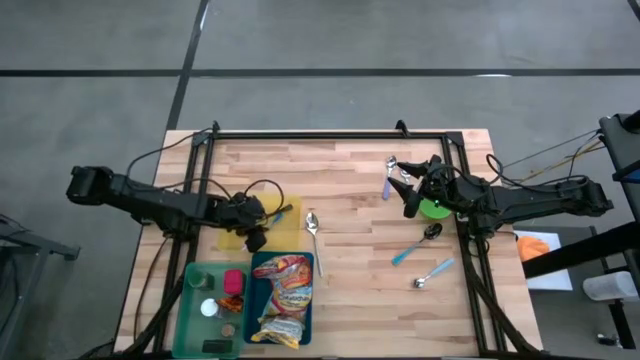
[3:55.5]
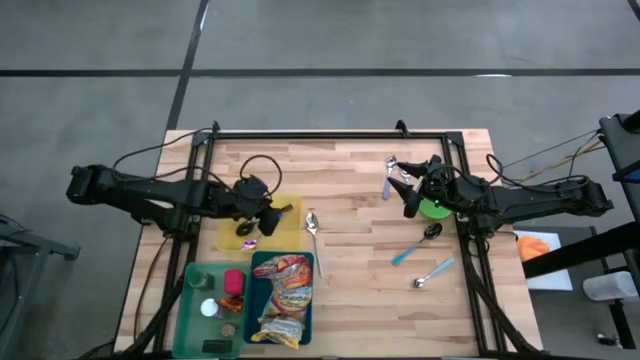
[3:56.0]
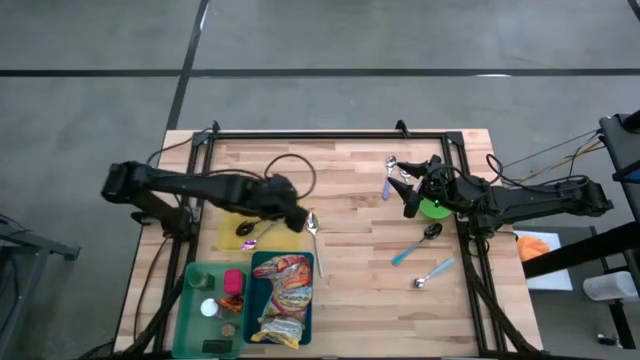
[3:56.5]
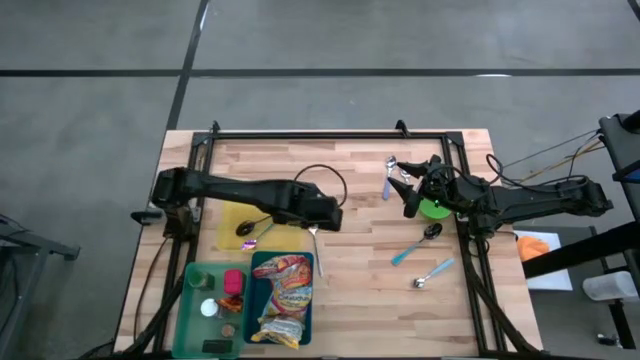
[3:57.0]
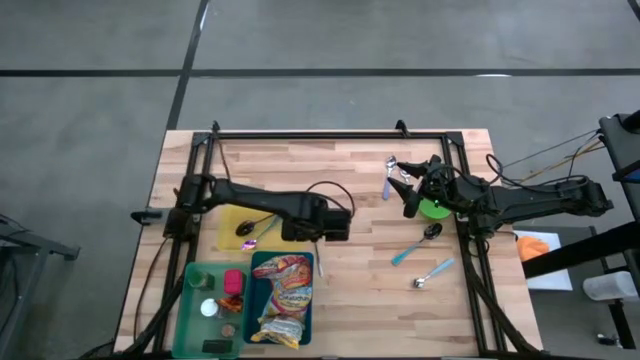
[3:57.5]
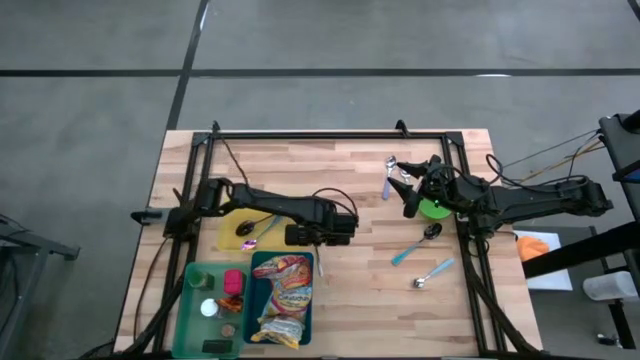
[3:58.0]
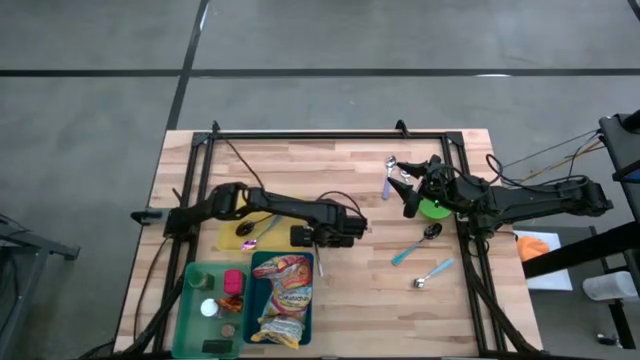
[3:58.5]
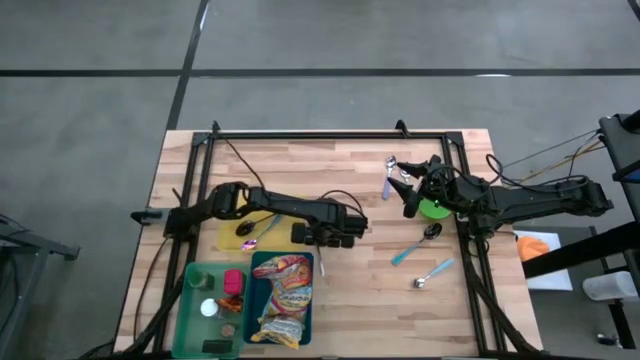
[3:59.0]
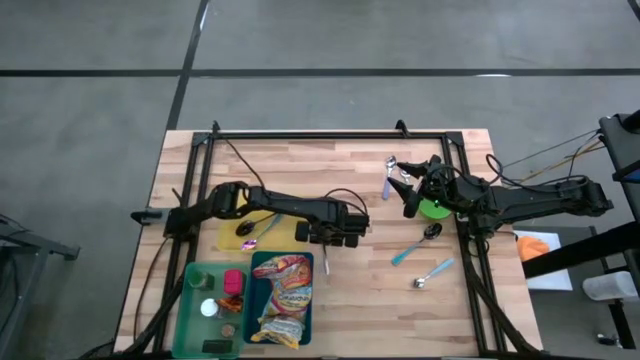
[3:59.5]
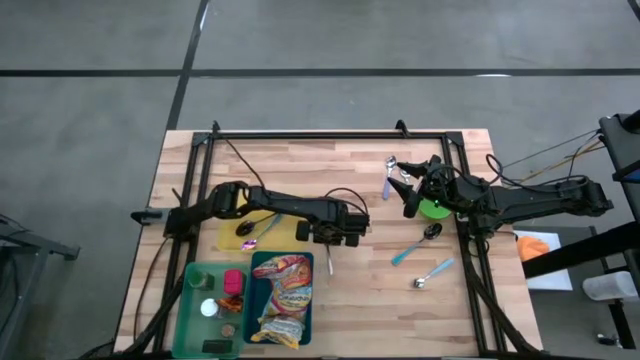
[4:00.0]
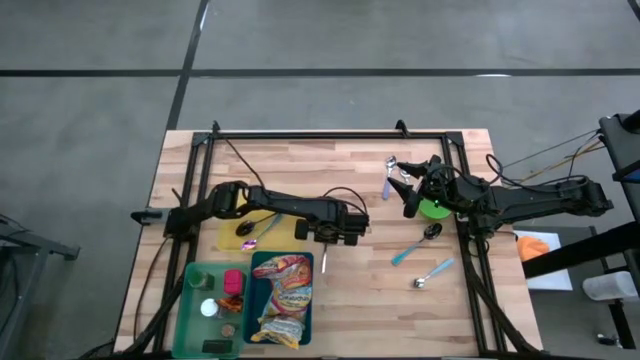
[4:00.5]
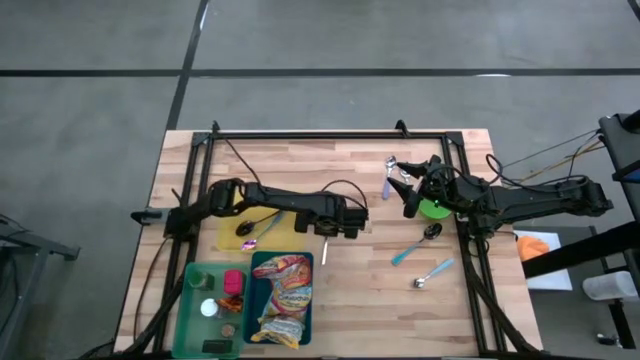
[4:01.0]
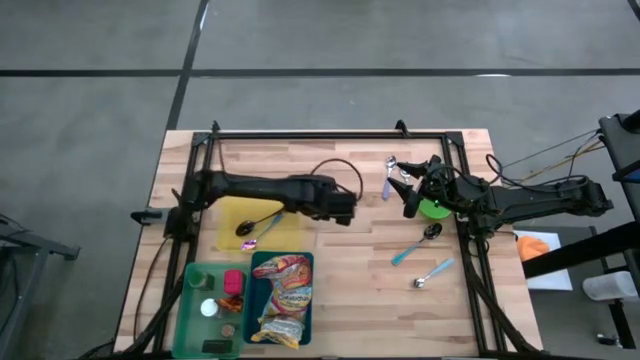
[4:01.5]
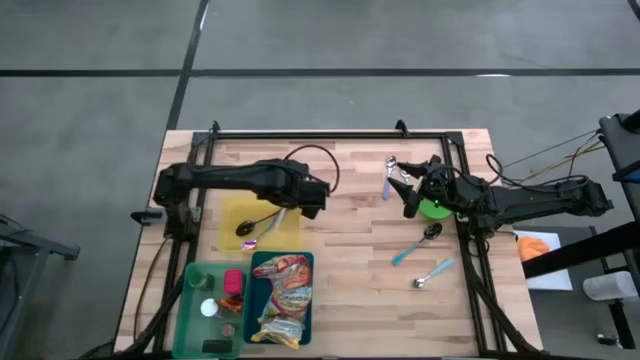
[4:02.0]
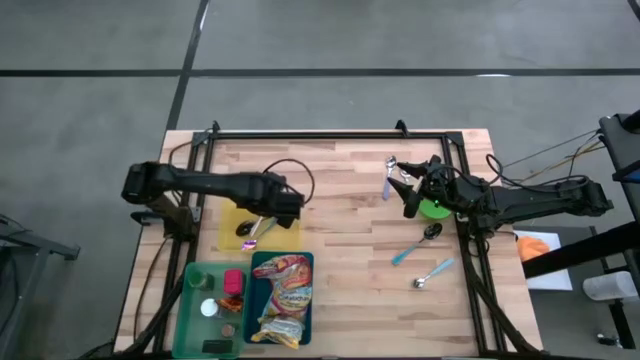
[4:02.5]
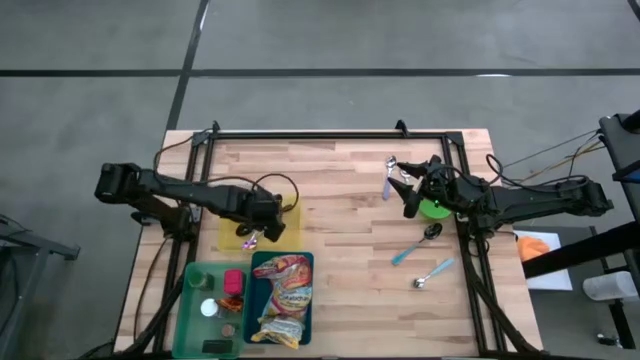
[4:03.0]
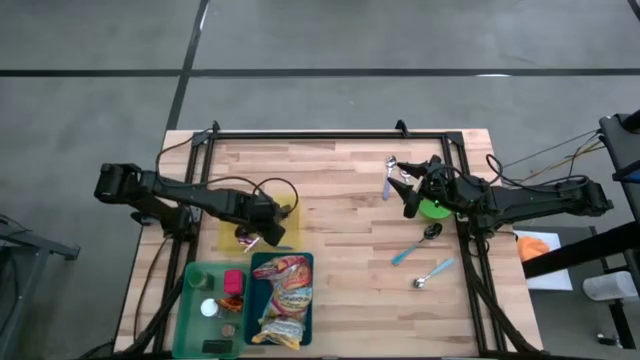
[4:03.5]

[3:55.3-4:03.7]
Put the silver spoon into the yellow bin

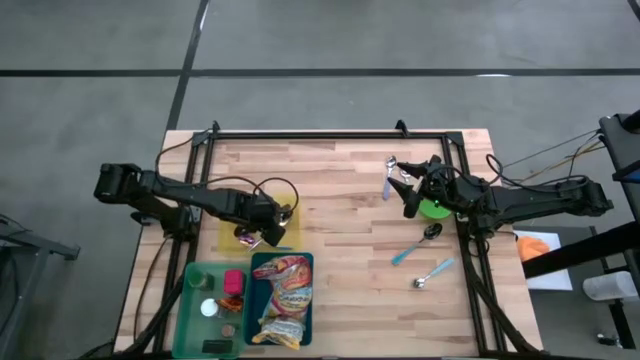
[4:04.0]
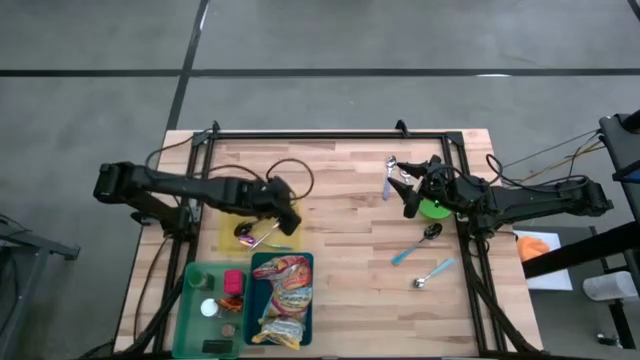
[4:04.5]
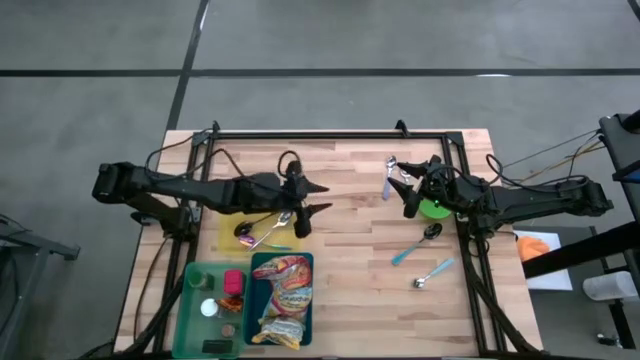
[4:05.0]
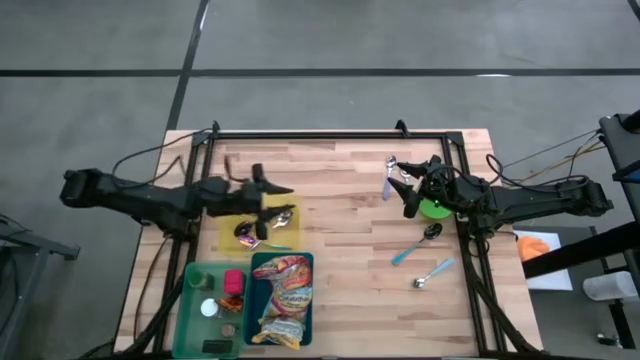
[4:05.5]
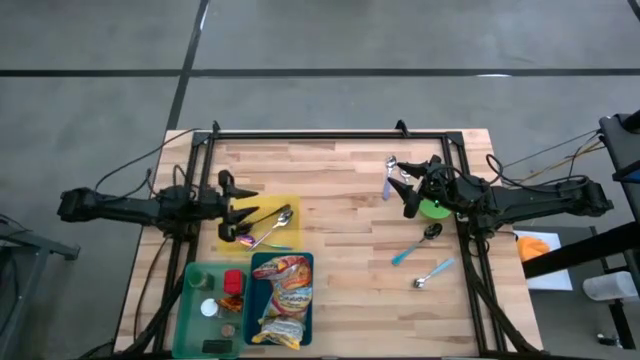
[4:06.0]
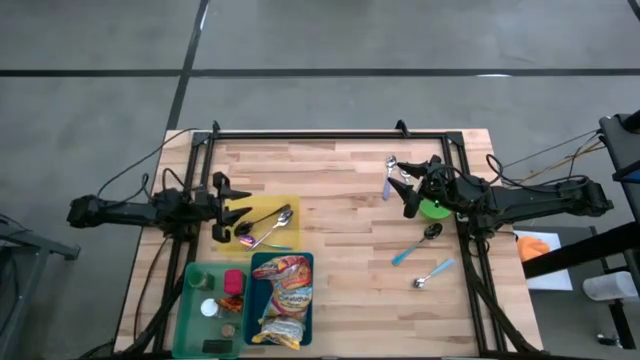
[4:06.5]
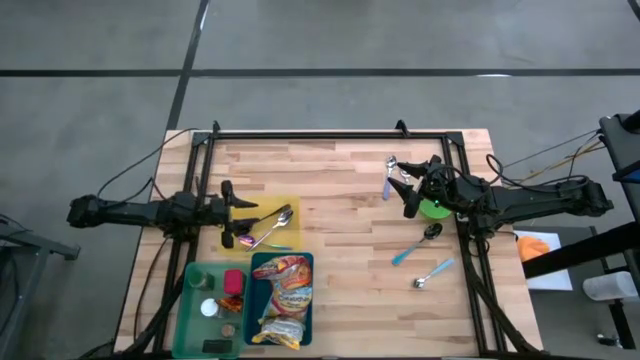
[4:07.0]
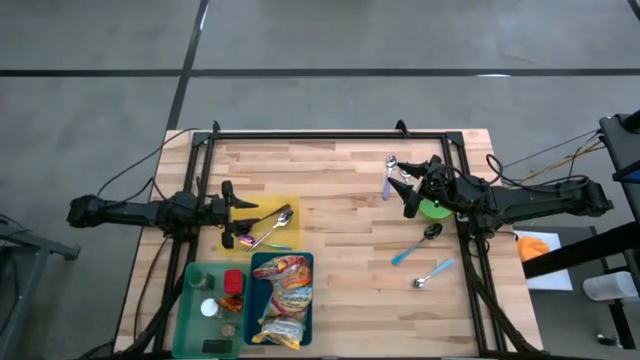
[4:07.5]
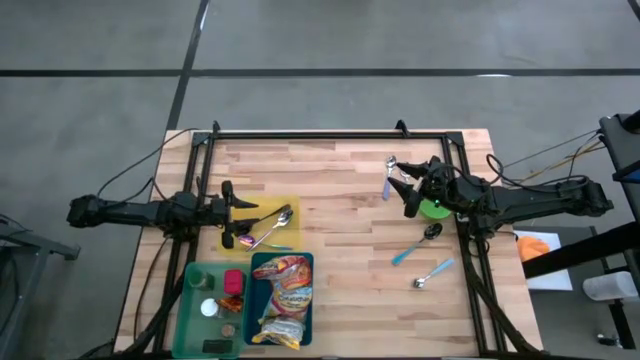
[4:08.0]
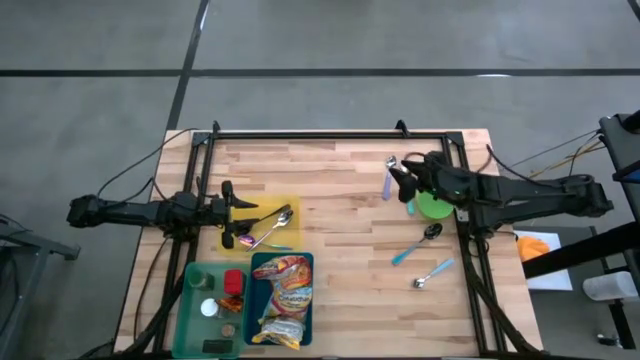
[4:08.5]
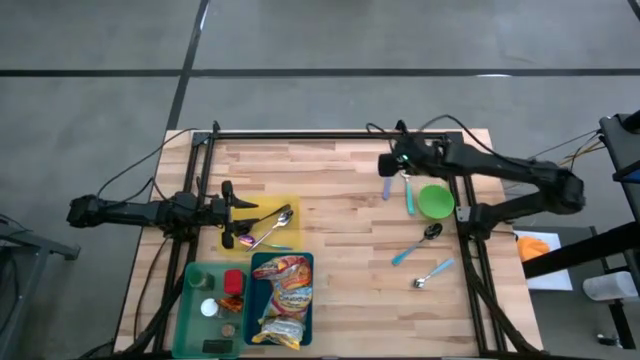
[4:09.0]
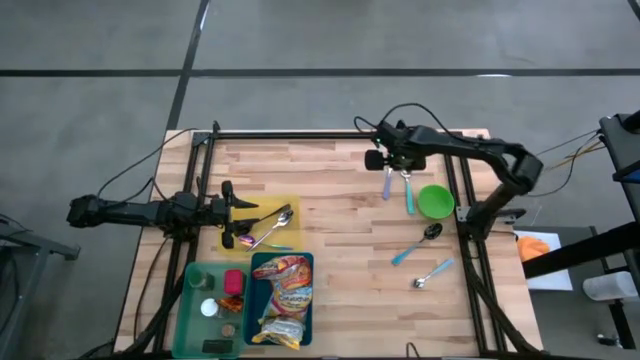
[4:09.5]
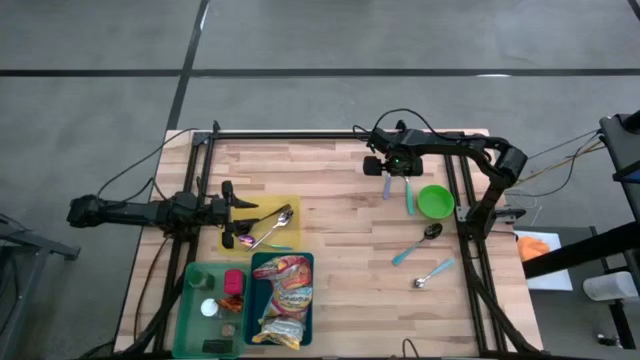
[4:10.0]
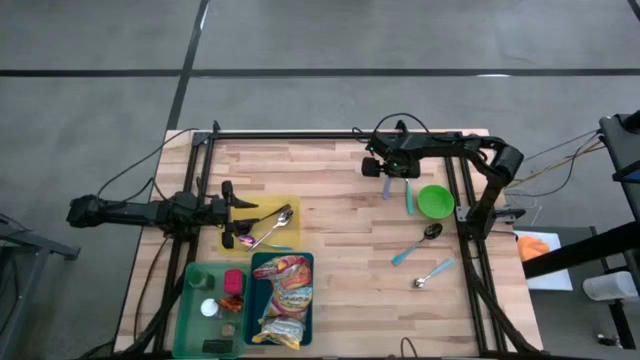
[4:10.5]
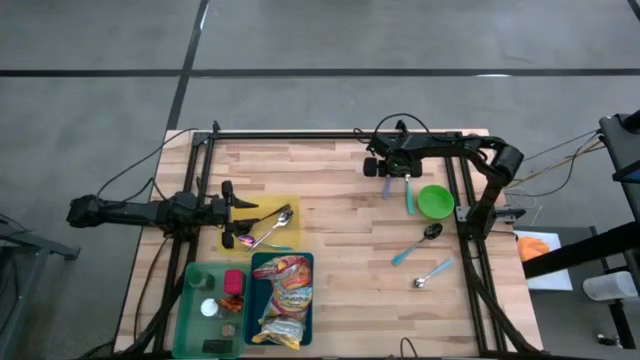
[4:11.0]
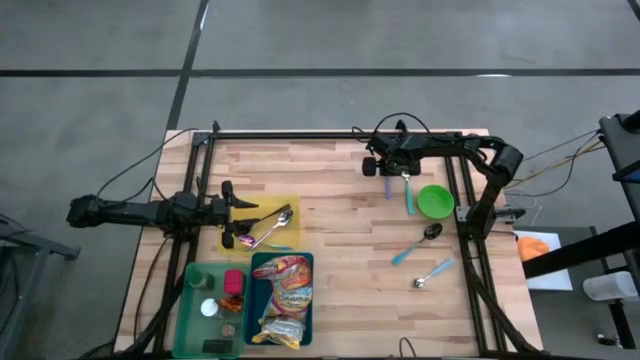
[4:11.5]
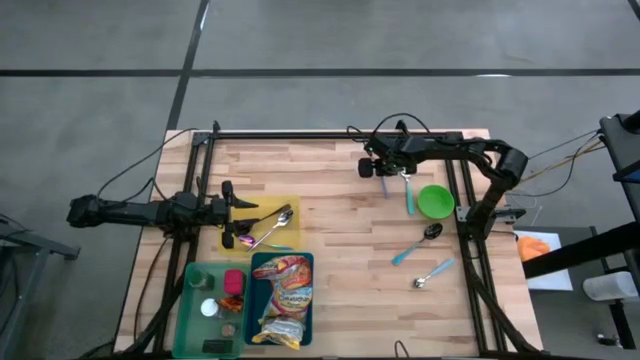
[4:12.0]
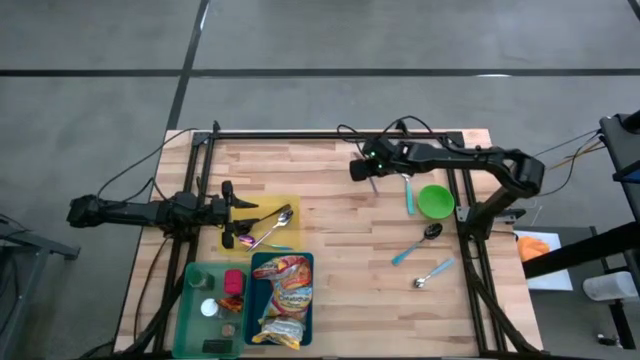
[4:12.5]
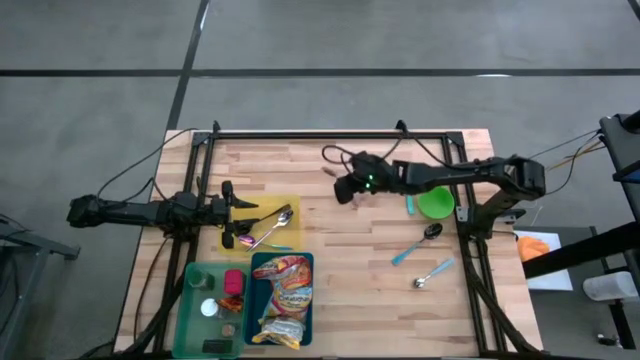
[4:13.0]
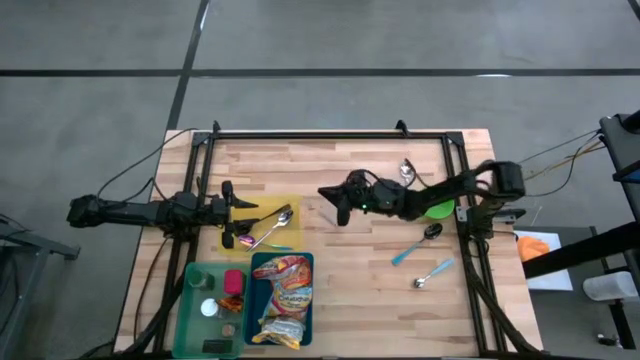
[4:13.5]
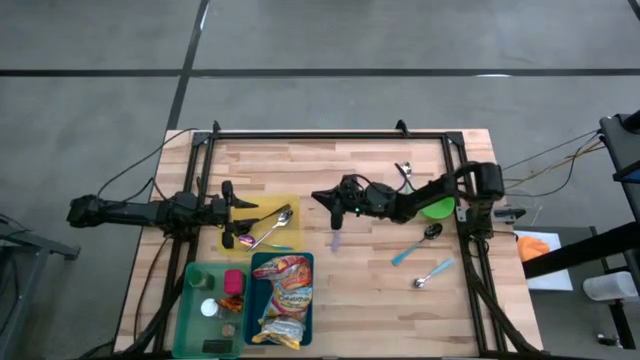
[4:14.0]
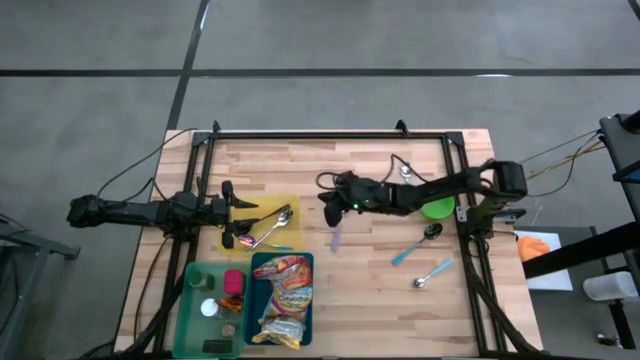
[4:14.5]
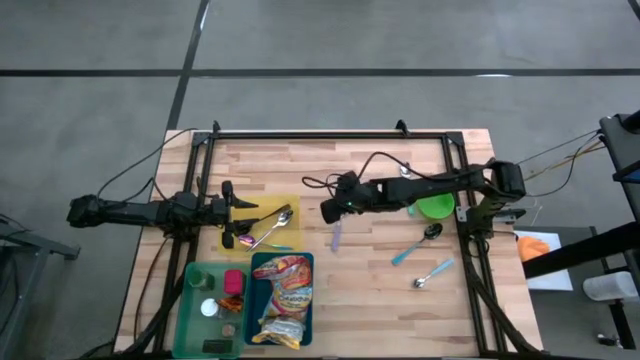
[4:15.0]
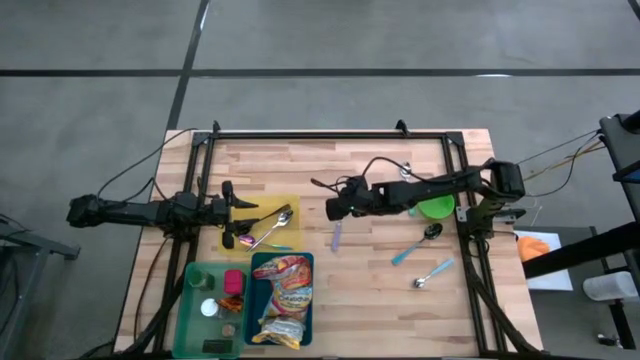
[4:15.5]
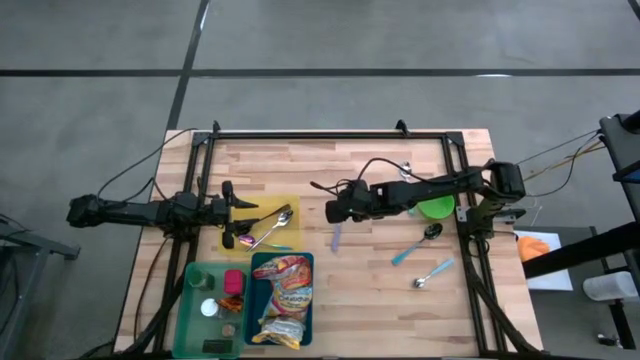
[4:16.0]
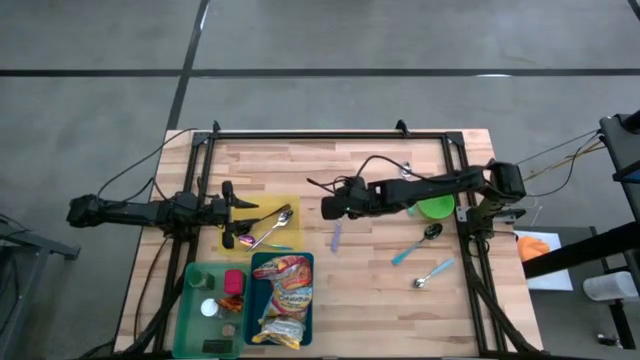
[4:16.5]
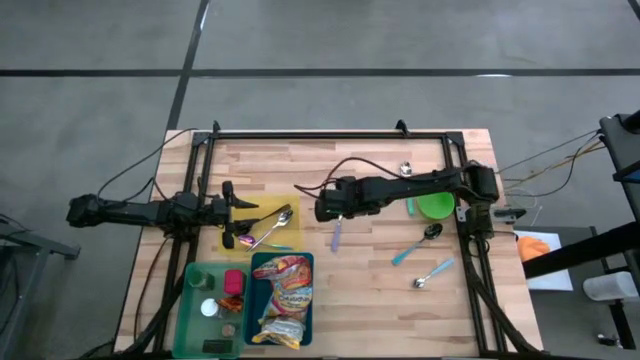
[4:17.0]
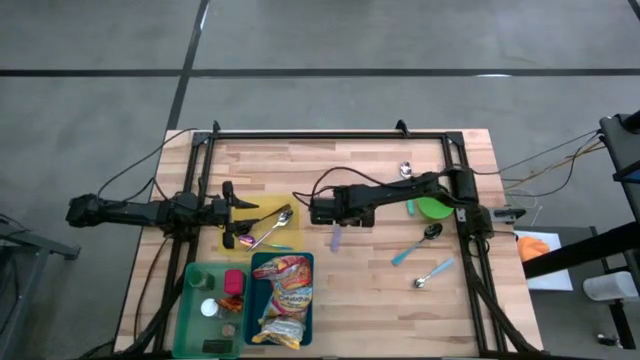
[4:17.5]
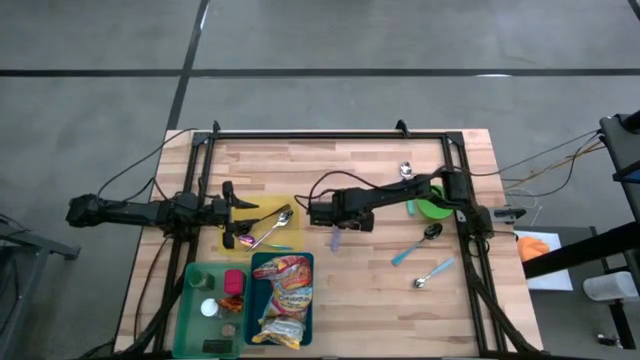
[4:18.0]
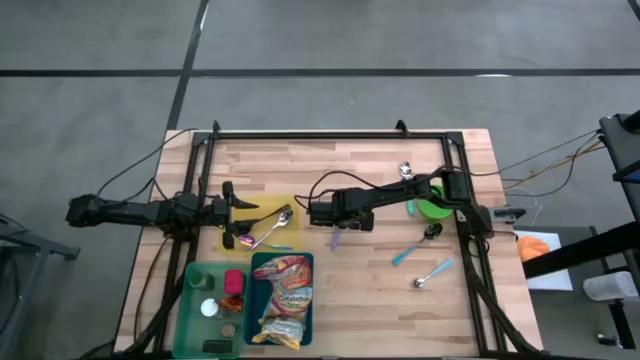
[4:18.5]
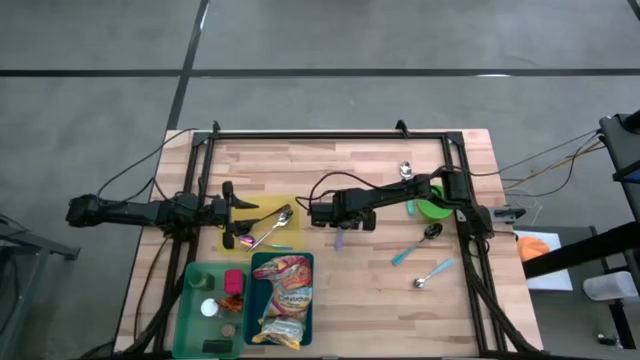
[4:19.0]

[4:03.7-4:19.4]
Put the violet spoon into the yellow bin
